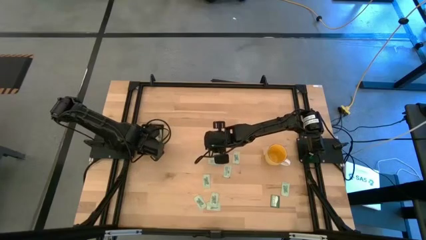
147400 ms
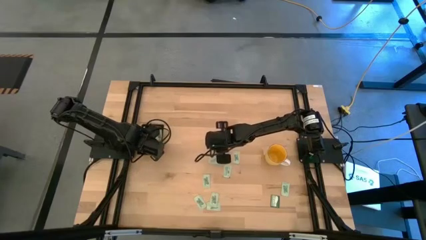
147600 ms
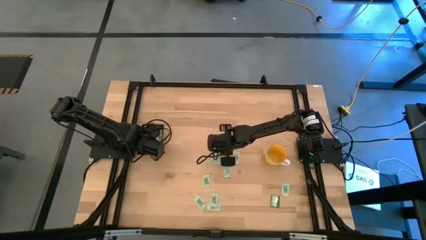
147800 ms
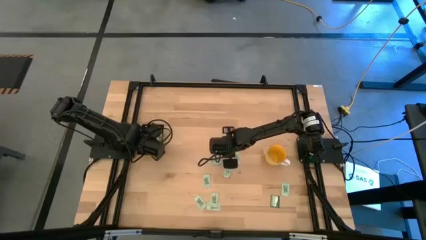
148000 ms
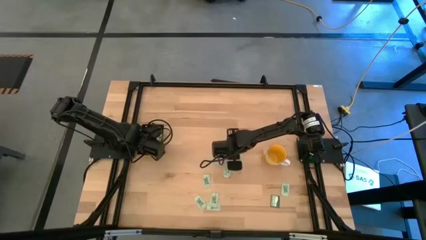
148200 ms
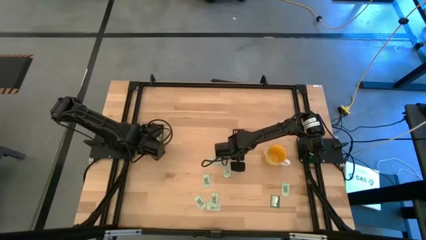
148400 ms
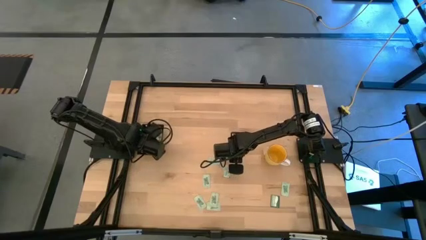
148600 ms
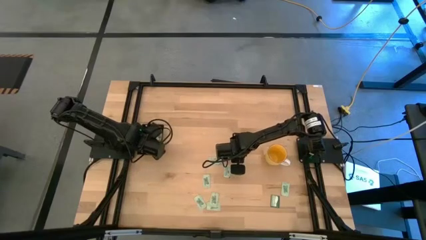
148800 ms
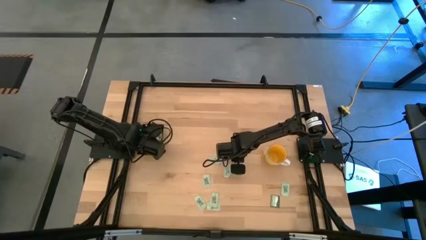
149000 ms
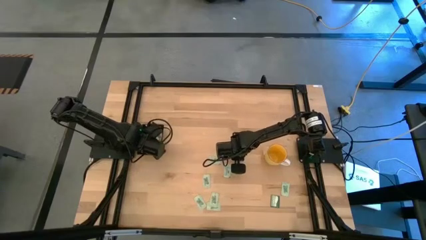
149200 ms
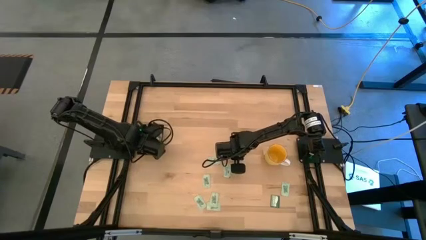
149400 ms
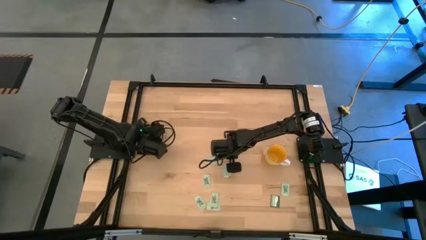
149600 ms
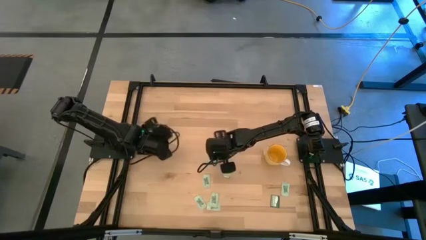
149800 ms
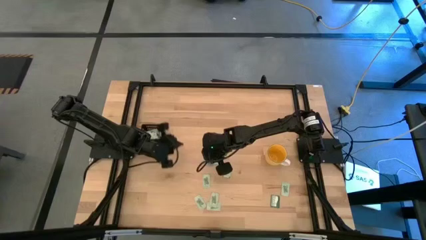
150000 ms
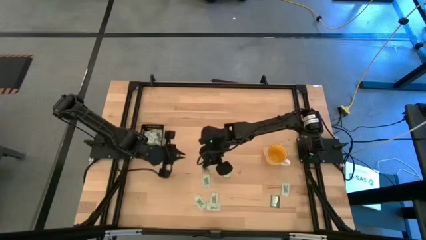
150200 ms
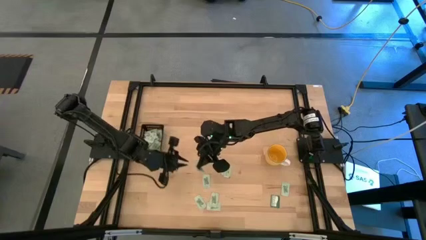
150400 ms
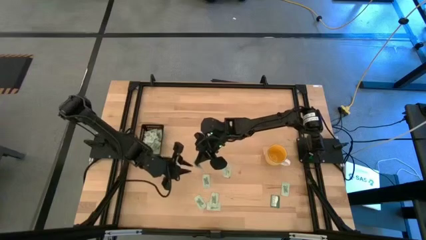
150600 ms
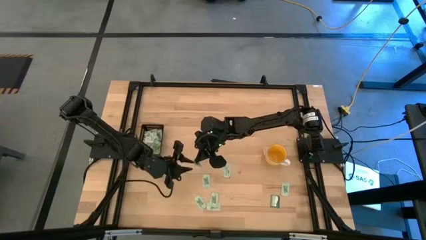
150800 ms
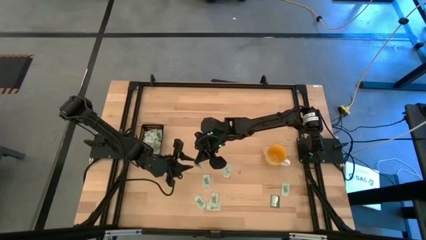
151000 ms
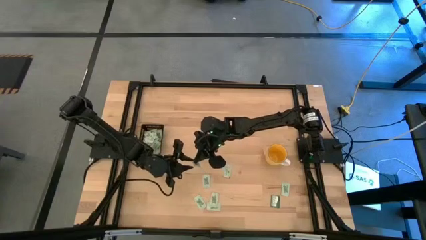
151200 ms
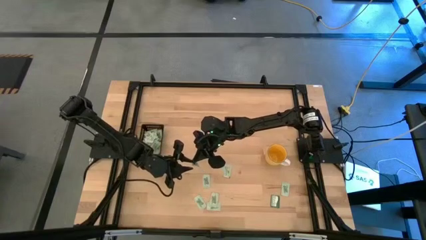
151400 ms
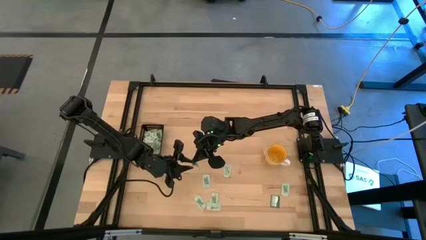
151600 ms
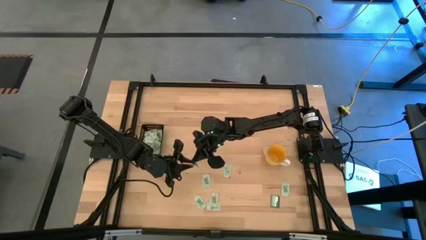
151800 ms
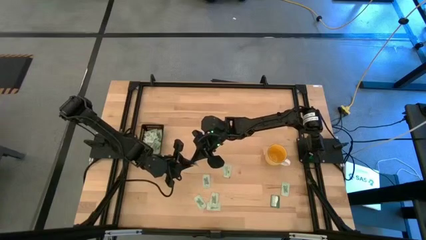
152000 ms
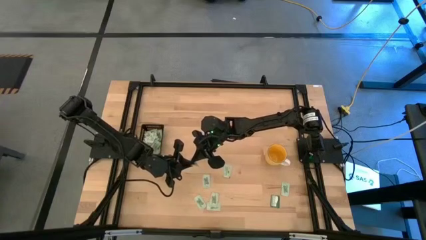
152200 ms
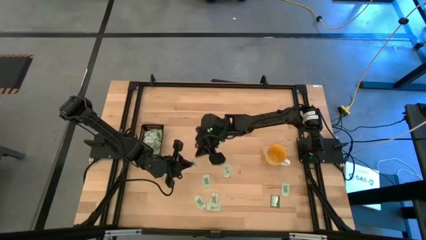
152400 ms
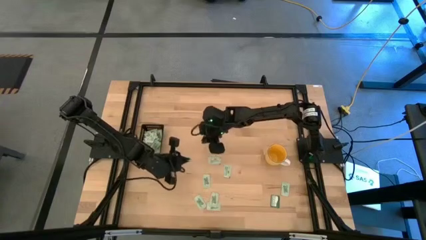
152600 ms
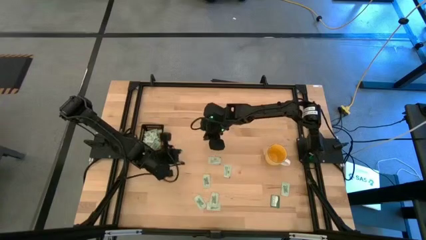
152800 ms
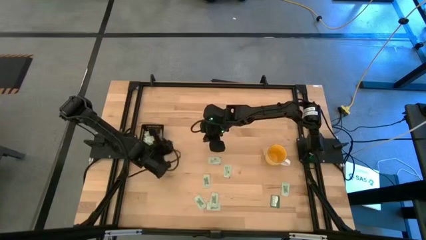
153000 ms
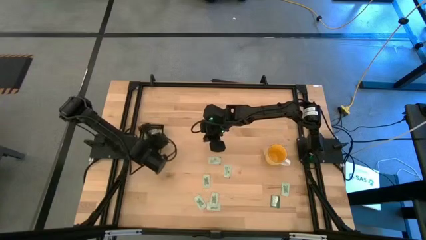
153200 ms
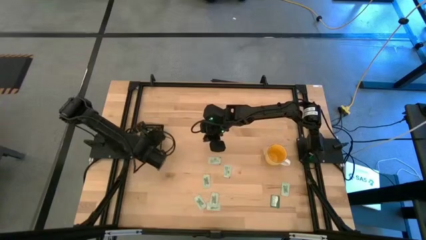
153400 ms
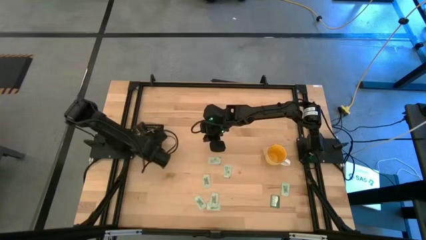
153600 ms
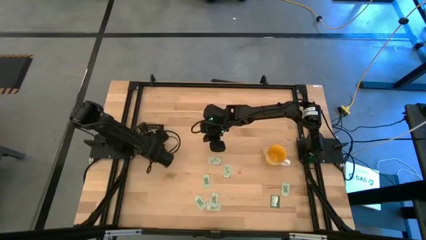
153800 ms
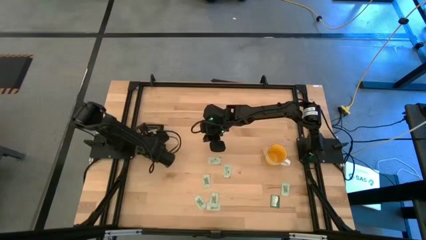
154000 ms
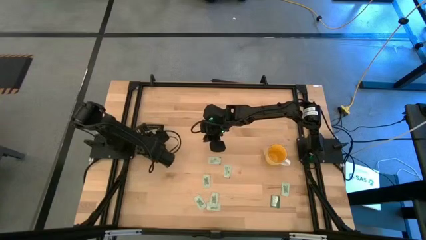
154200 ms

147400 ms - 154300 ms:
Task: Pick and place Stevia / Truvia into bins
Put the stevia packet into the black bin

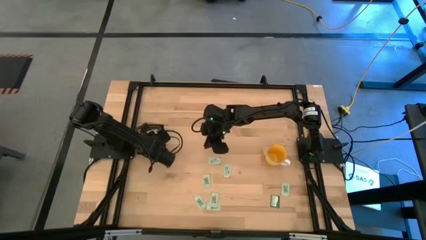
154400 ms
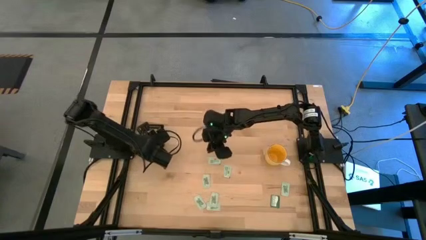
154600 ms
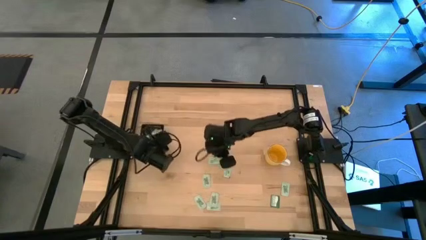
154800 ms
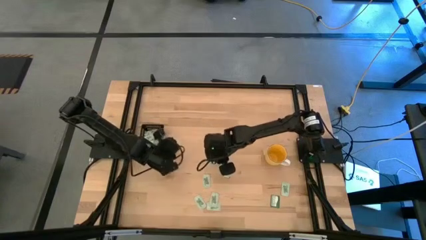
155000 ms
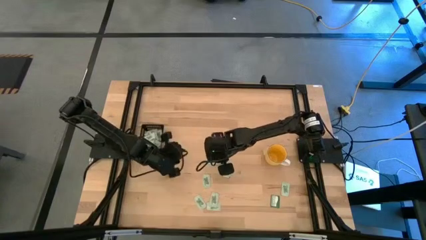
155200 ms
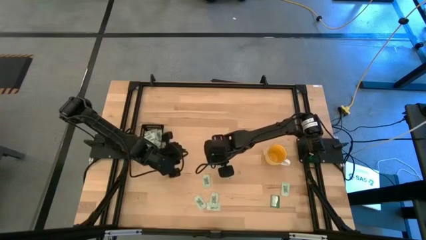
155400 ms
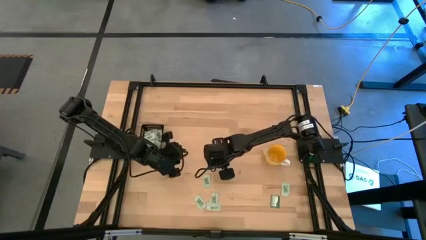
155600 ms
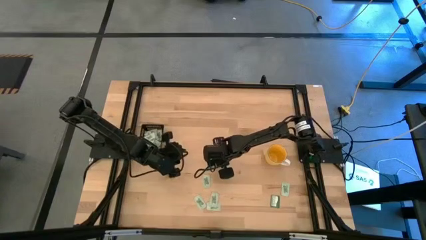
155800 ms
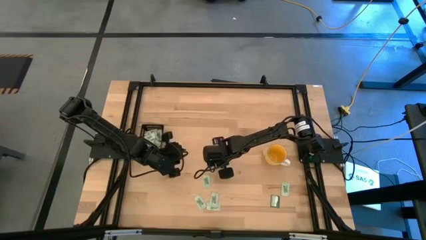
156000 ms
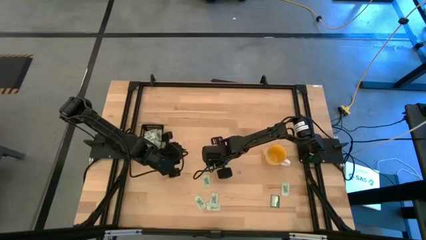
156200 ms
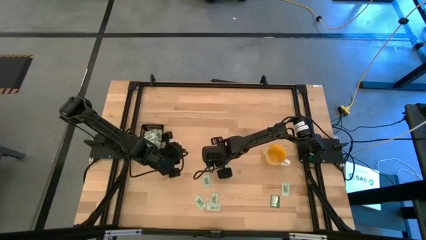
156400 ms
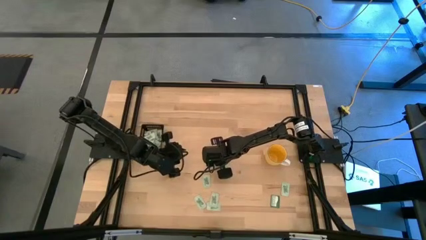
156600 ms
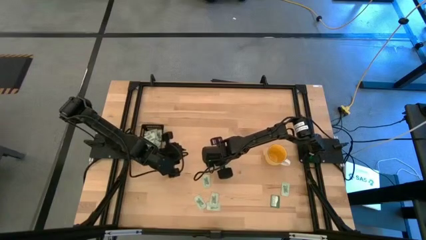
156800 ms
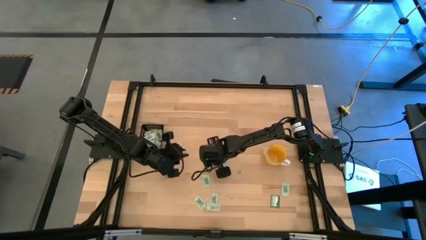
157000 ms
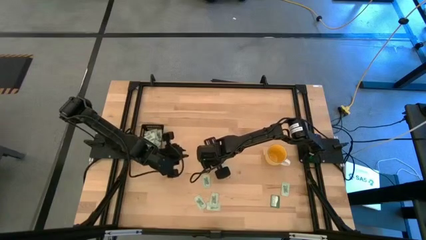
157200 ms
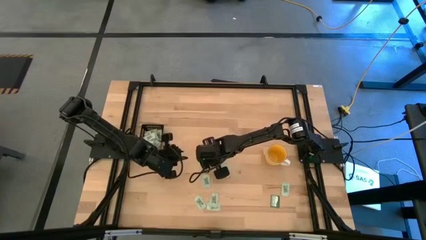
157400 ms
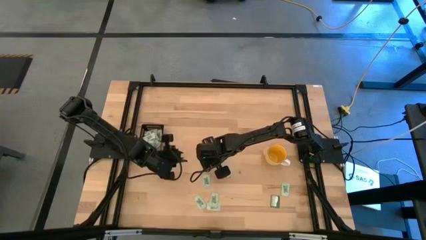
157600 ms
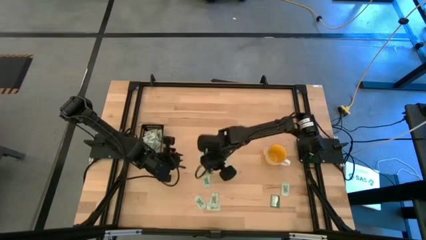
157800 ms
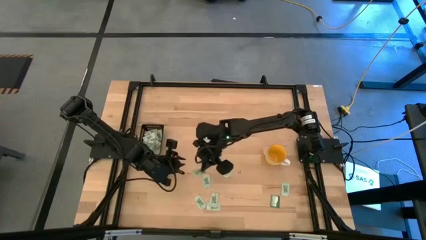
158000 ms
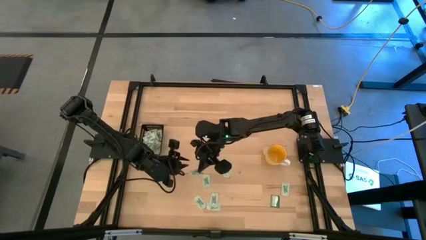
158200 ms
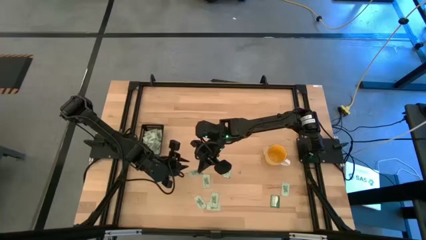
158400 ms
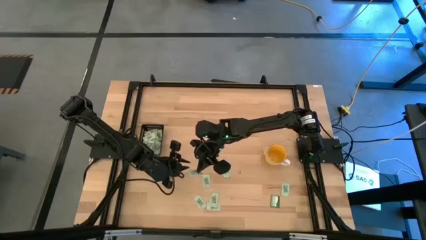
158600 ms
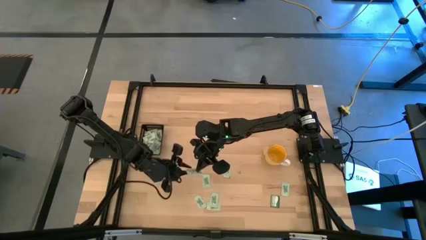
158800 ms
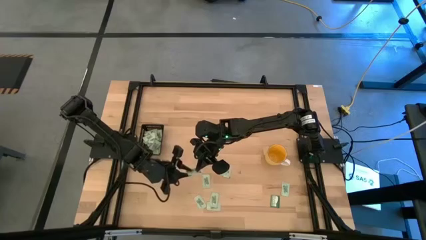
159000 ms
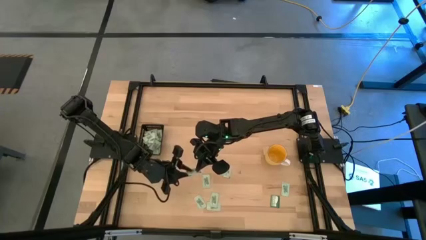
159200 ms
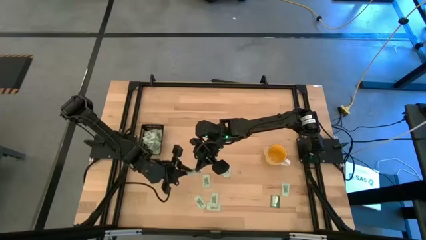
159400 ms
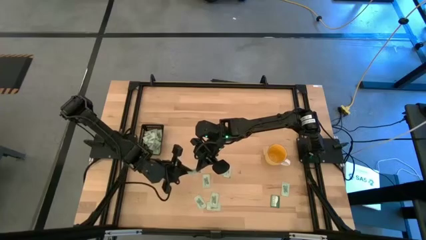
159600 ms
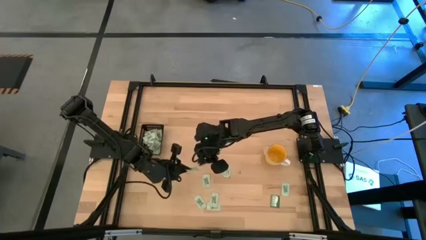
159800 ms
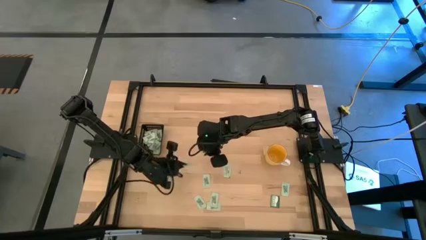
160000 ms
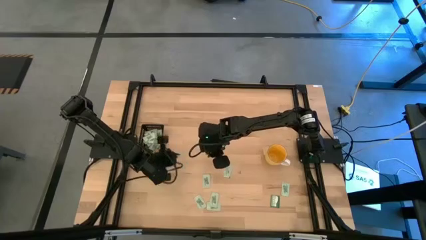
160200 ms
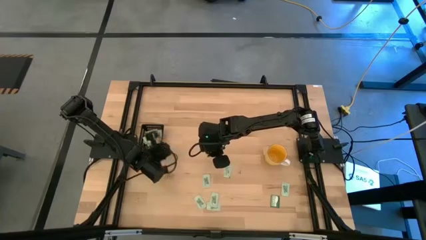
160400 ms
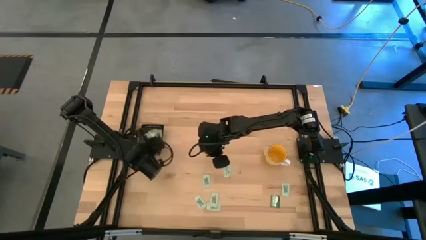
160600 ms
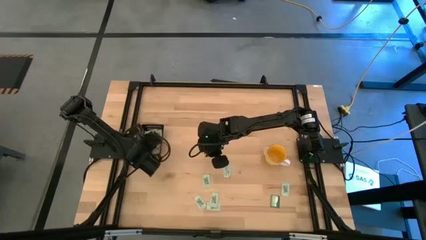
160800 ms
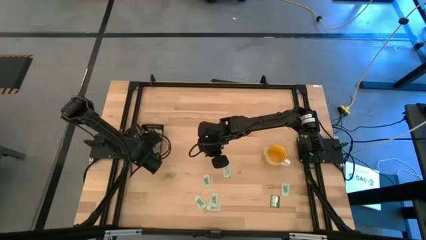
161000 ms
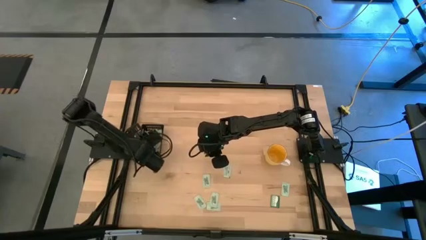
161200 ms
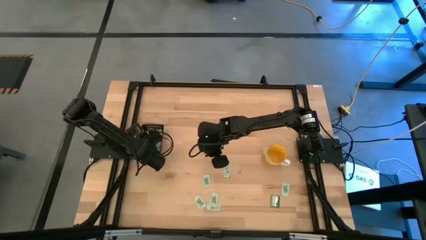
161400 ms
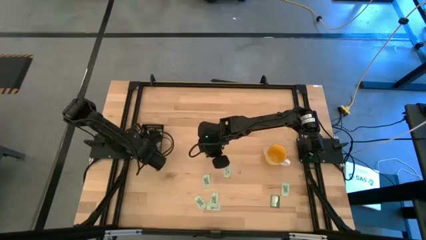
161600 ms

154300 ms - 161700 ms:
Put the stevia packet into the black bin
